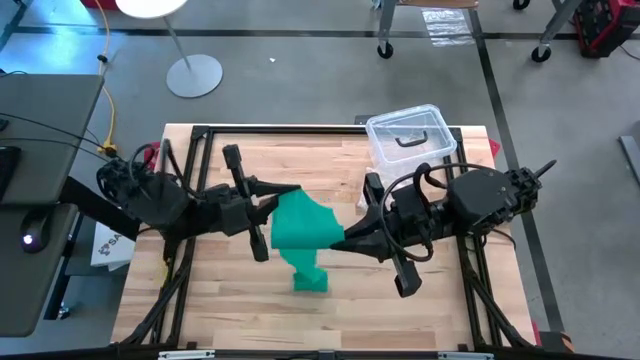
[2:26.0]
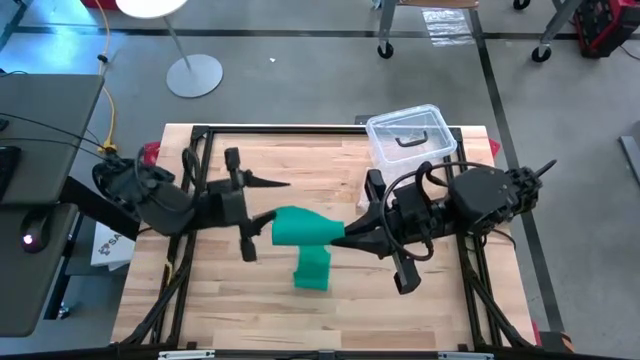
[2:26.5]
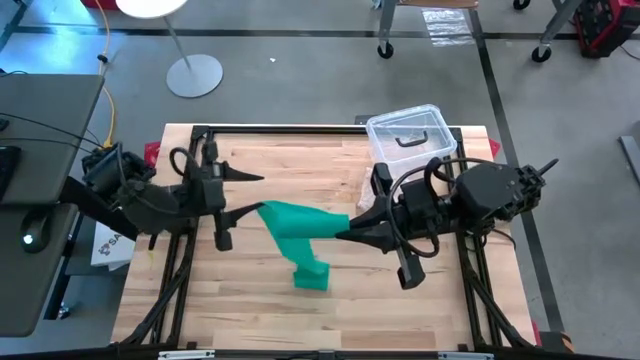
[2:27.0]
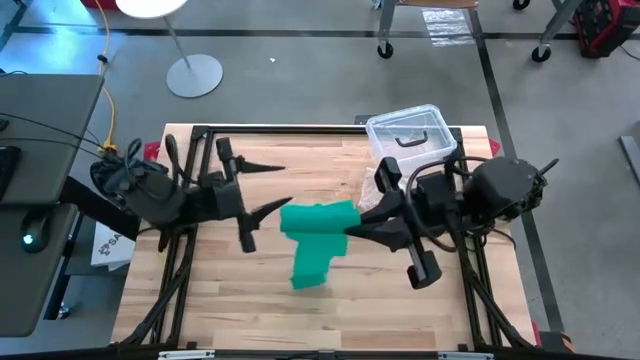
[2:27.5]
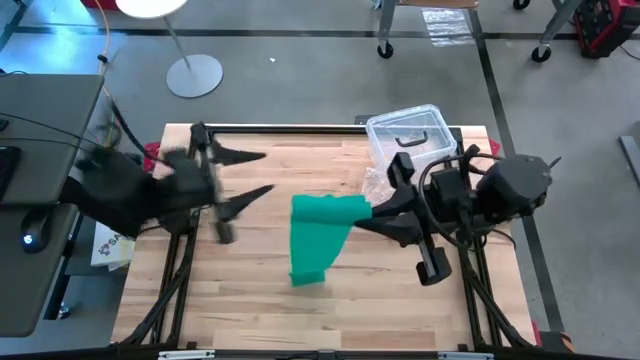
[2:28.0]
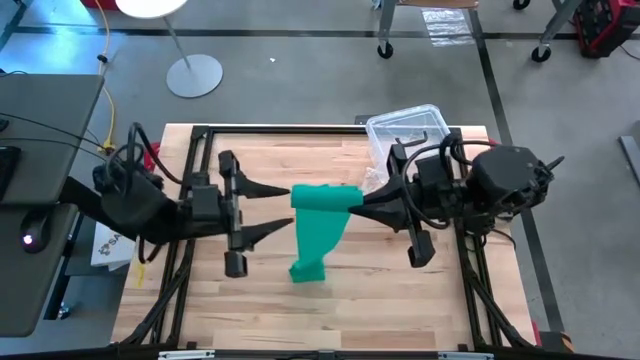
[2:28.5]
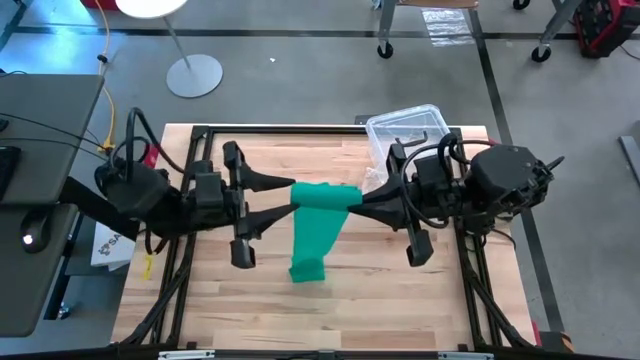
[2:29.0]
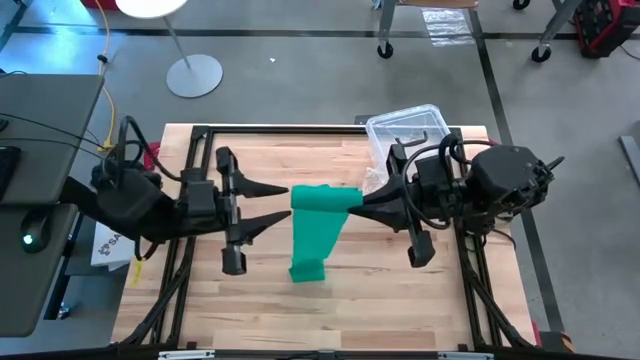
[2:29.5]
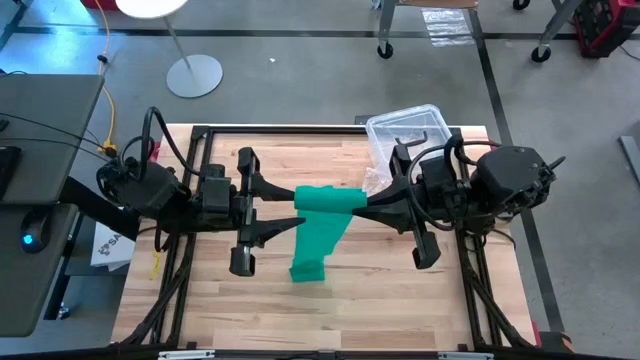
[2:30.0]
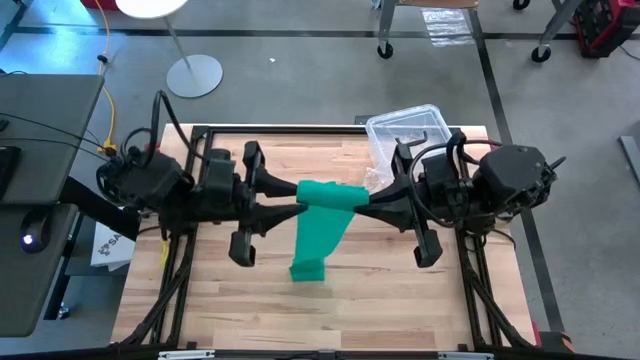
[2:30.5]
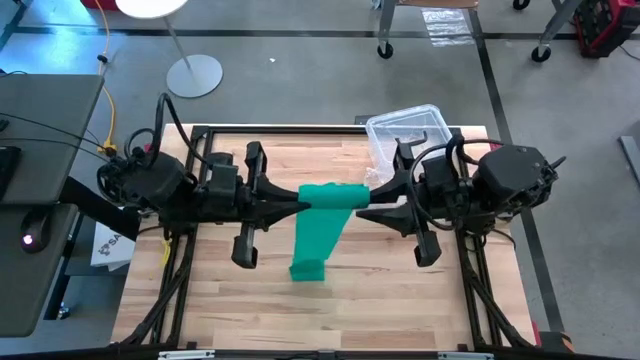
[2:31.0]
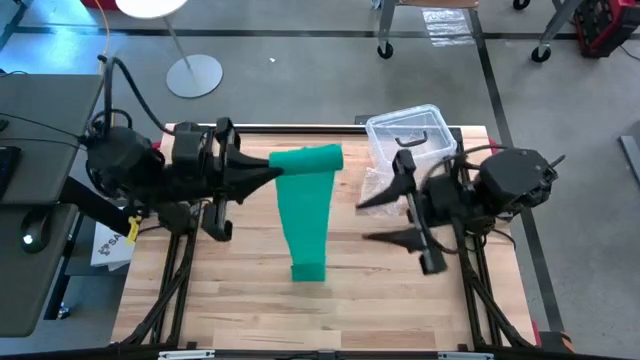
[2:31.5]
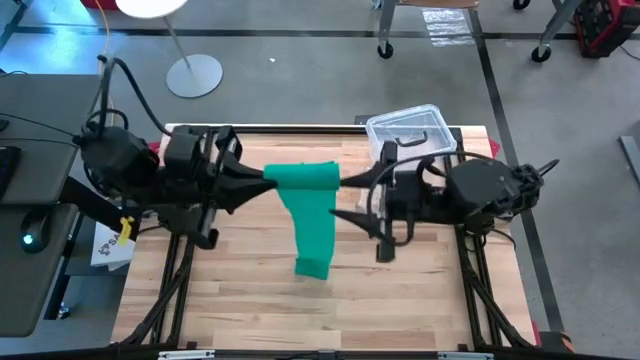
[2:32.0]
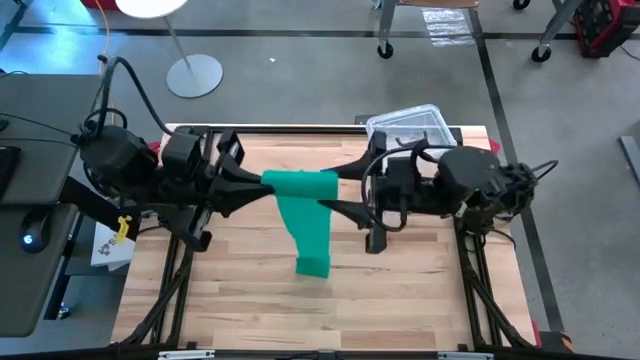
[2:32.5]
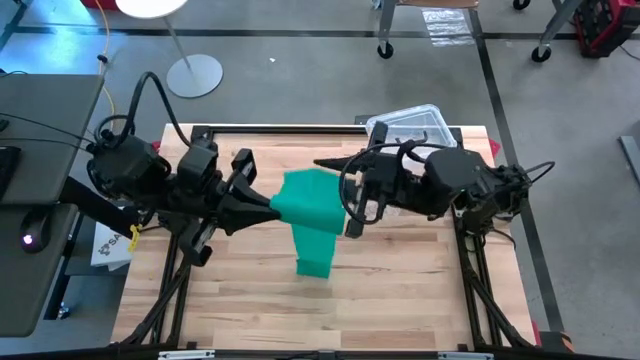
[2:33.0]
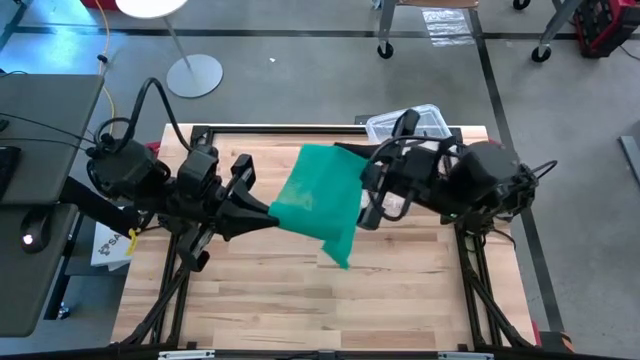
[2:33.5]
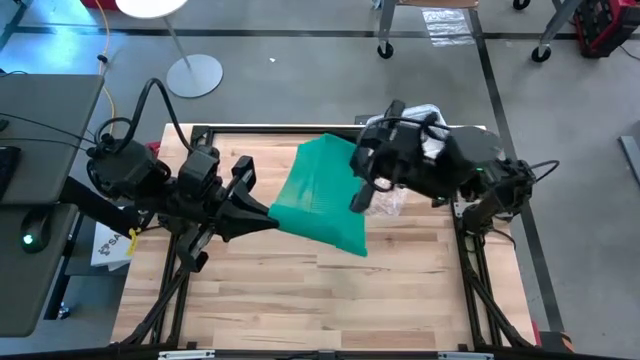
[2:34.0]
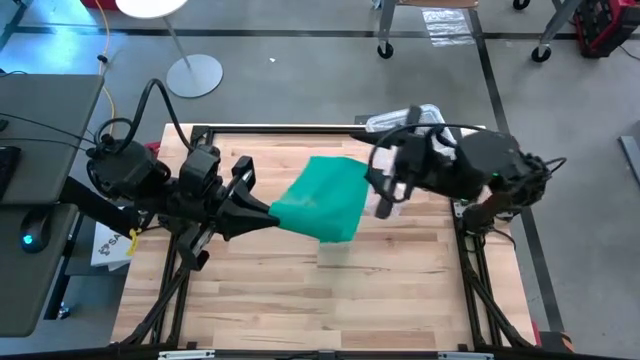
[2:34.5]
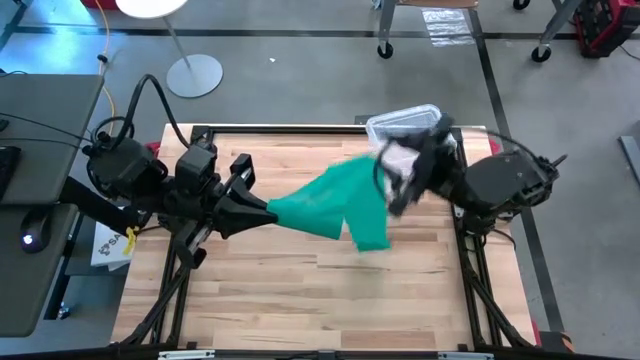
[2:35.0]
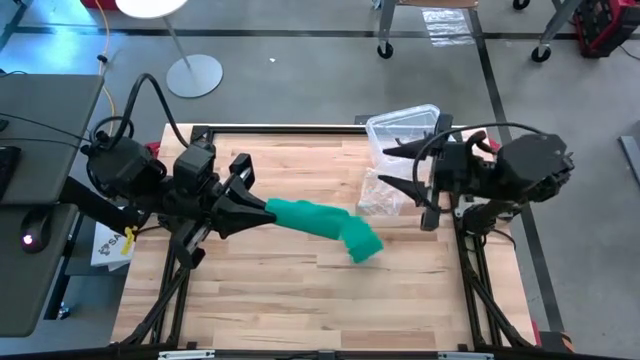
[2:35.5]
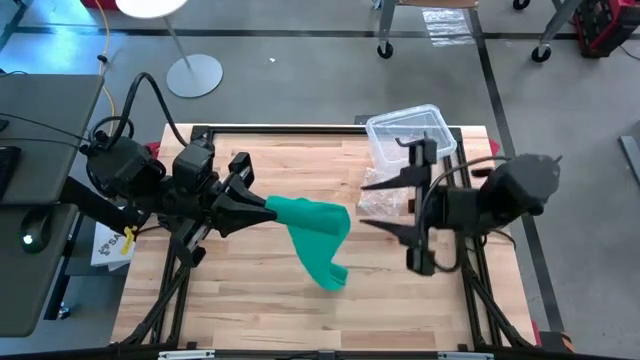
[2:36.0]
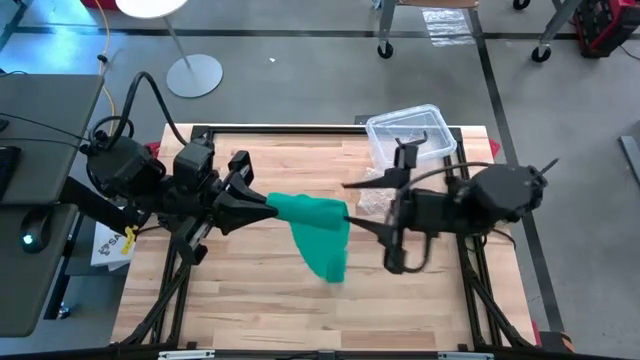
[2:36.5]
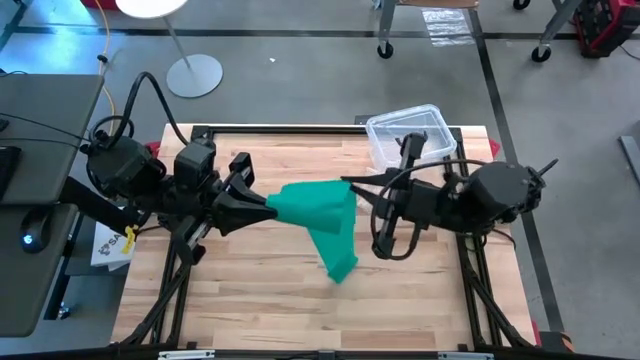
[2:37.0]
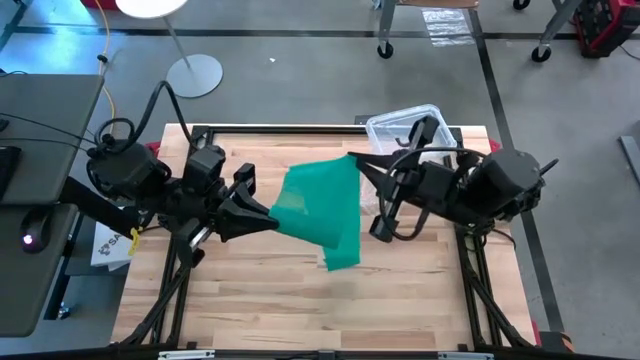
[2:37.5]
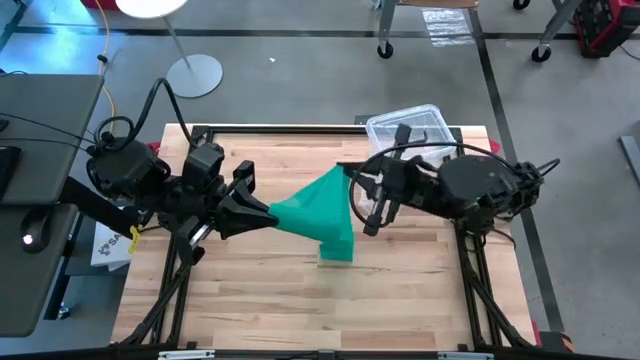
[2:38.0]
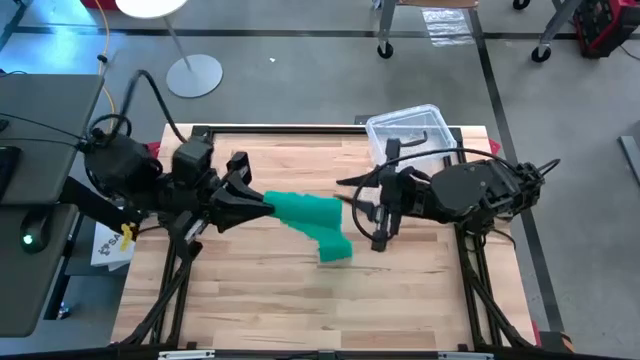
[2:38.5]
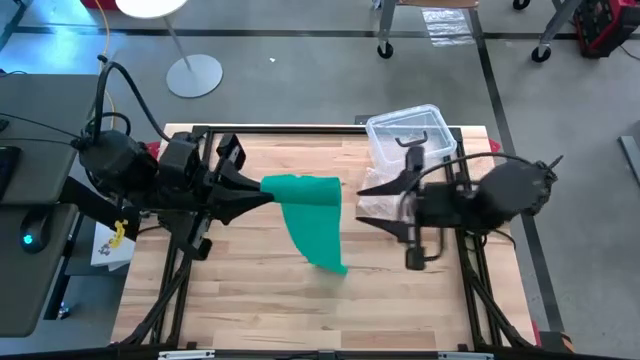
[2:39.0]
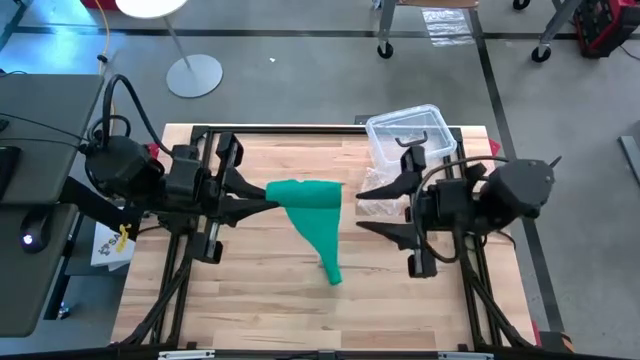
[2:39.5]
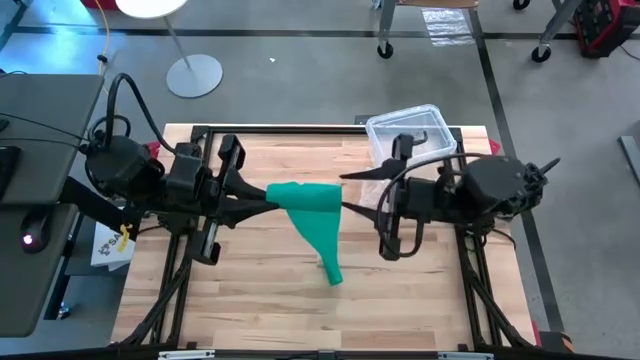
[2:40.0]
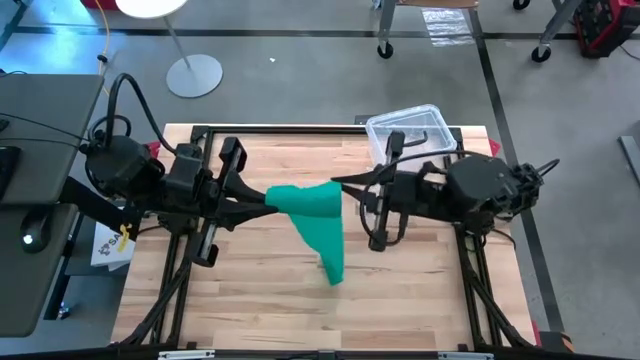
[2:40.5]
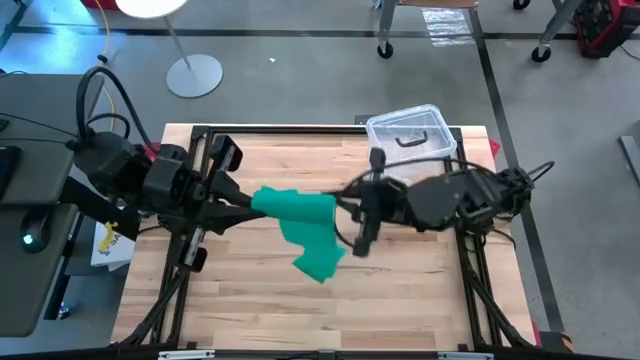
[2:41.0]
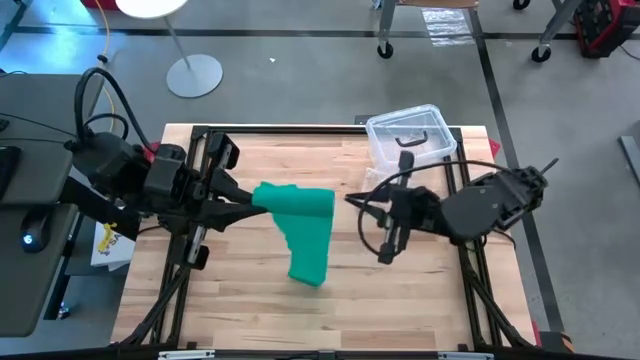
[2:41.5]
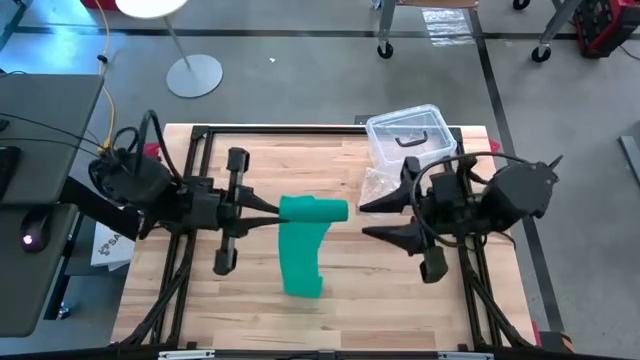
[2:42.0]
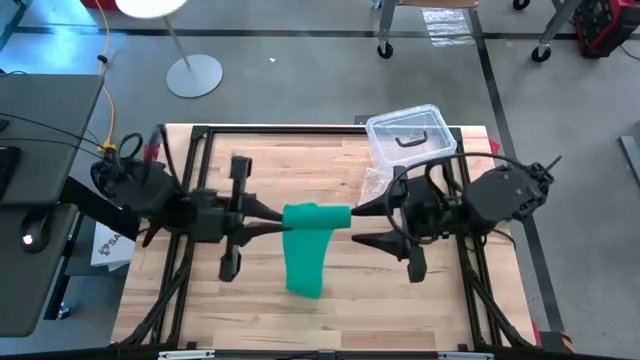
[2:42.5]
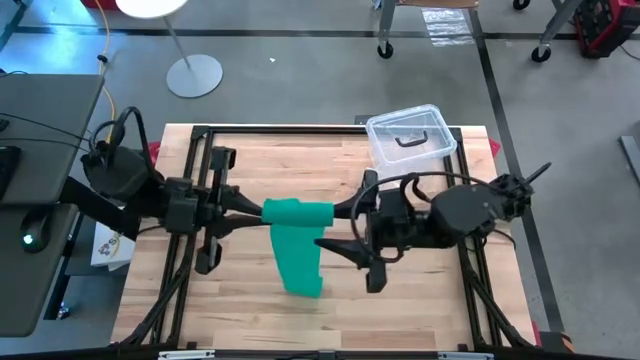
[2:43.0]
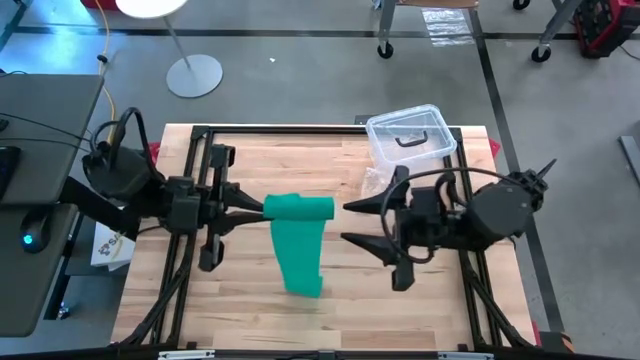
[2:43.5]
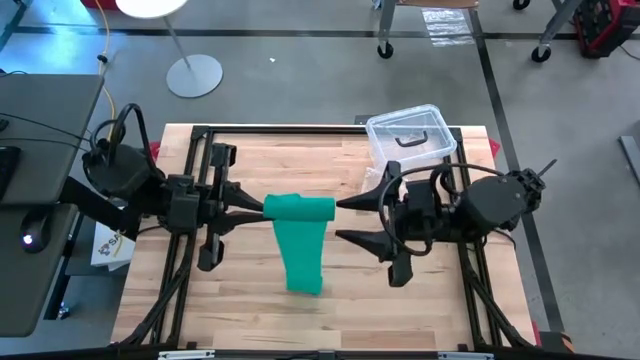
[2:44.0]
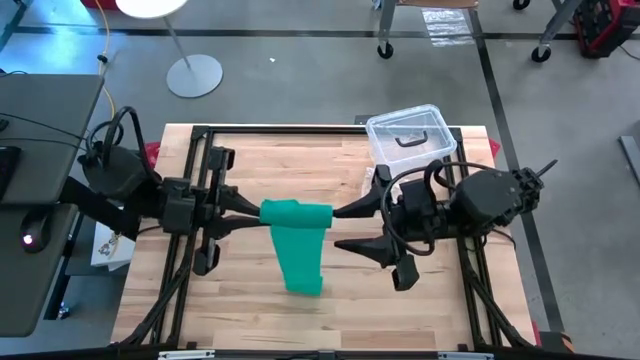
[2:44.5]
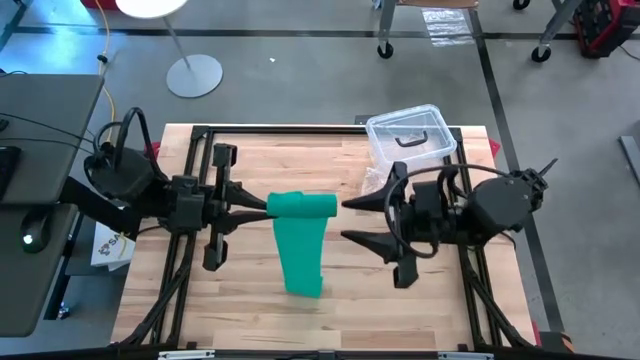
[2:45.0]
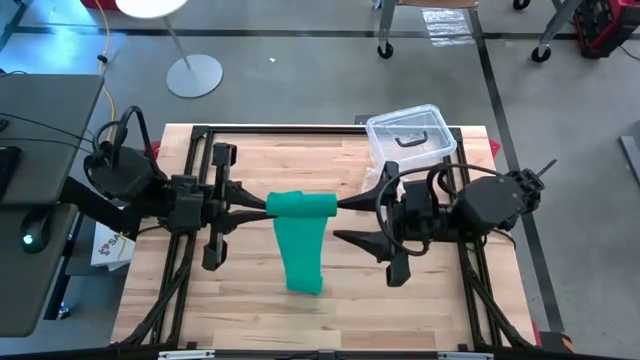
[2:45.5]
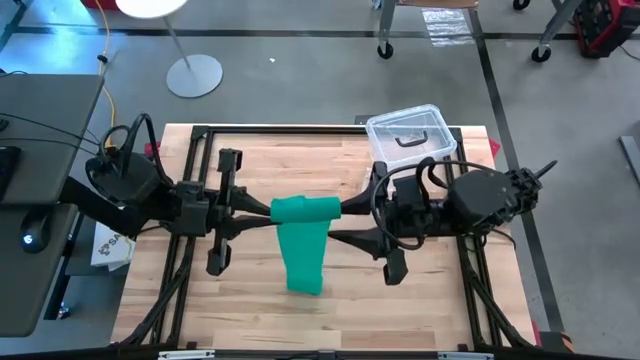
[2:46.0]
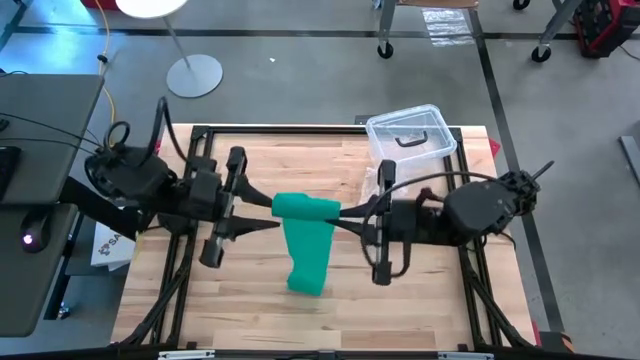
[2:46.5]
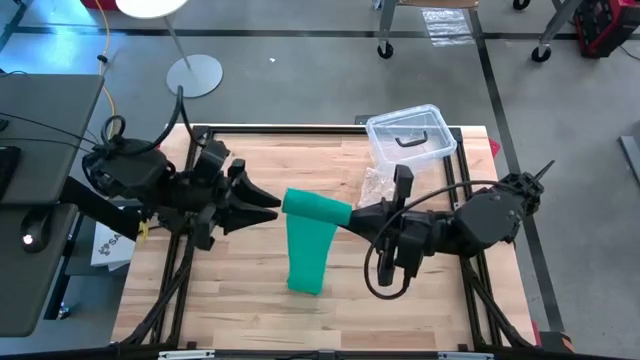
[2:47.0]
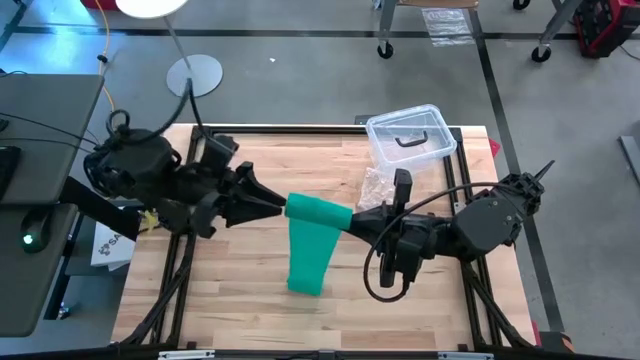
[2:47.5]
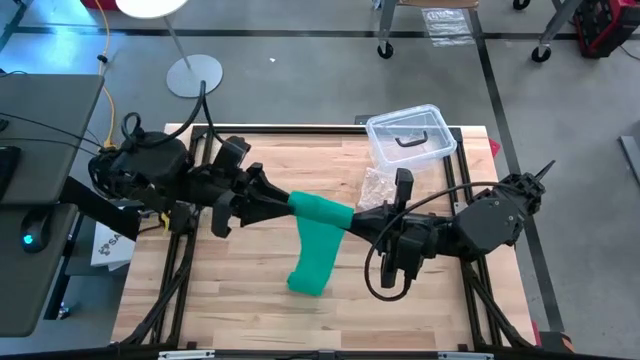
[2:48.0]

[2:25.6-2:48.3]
Task: Roll bandage
Roll the green bandage
